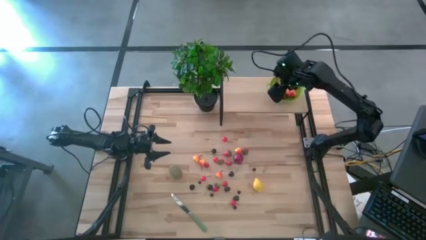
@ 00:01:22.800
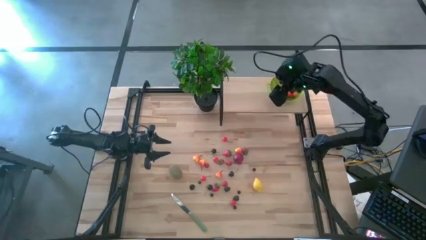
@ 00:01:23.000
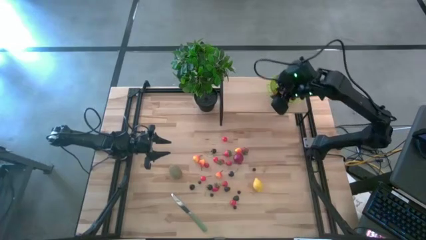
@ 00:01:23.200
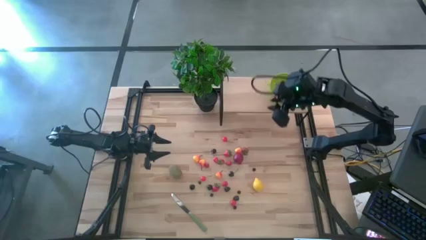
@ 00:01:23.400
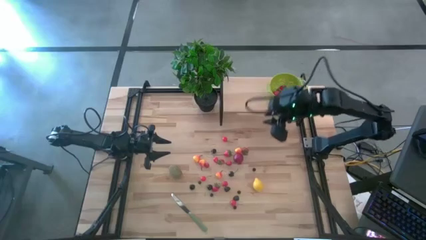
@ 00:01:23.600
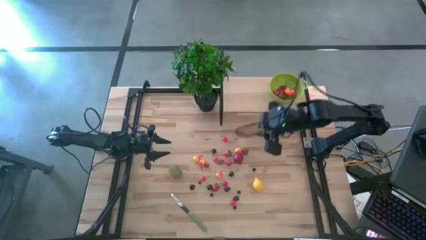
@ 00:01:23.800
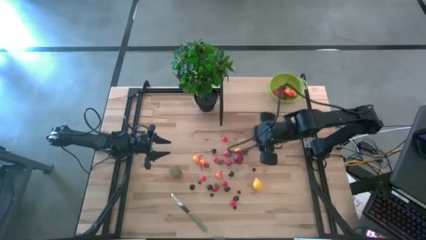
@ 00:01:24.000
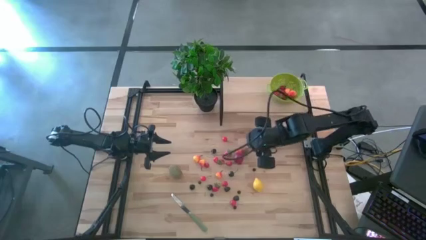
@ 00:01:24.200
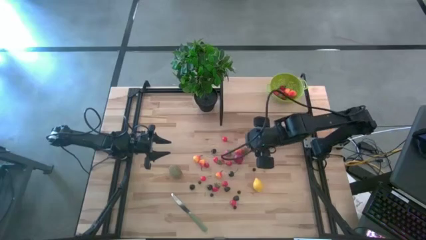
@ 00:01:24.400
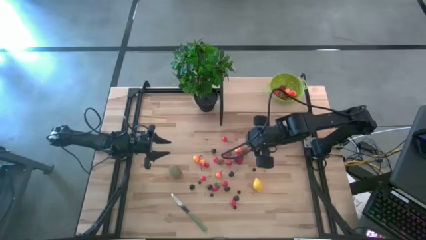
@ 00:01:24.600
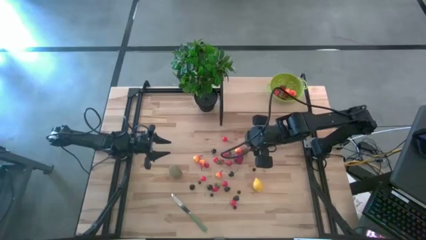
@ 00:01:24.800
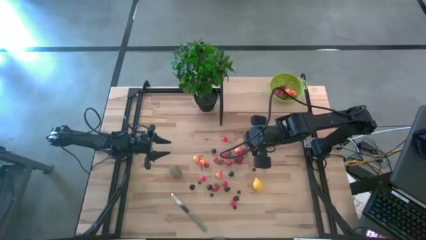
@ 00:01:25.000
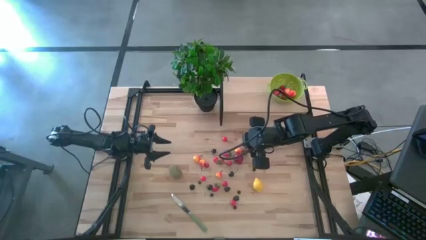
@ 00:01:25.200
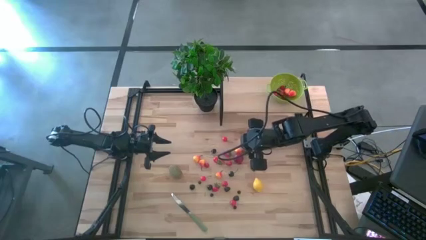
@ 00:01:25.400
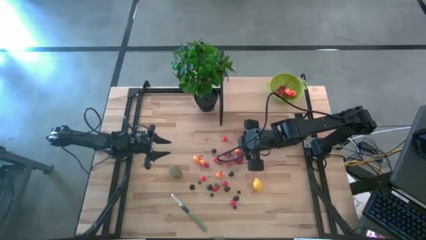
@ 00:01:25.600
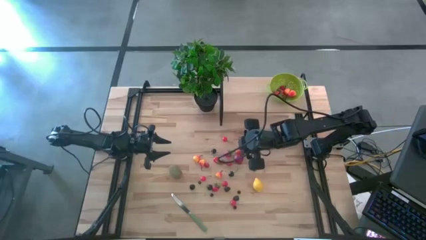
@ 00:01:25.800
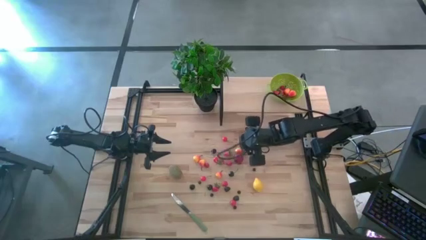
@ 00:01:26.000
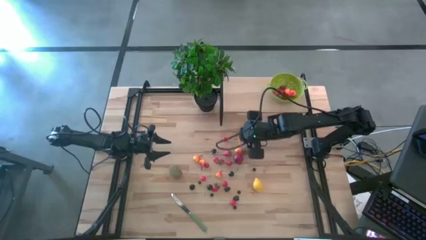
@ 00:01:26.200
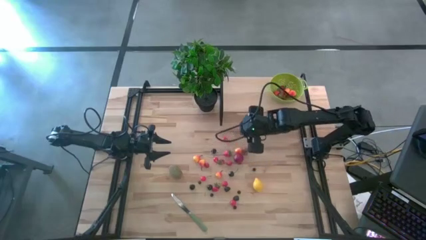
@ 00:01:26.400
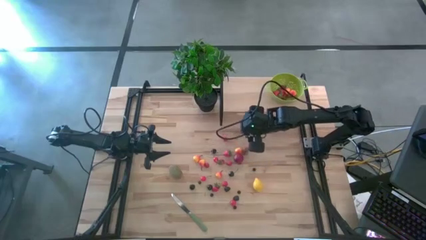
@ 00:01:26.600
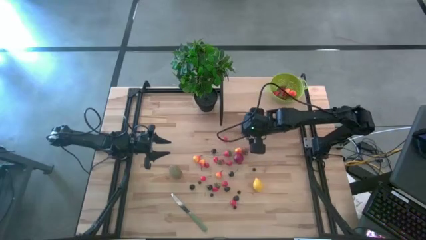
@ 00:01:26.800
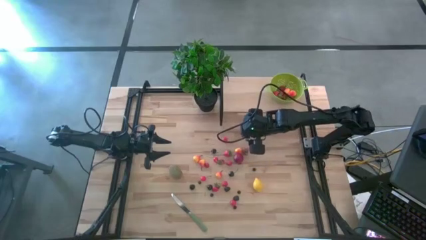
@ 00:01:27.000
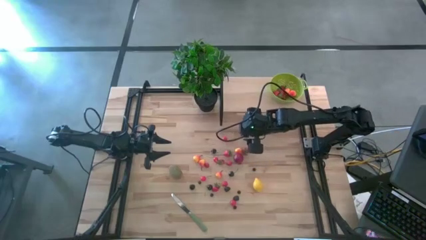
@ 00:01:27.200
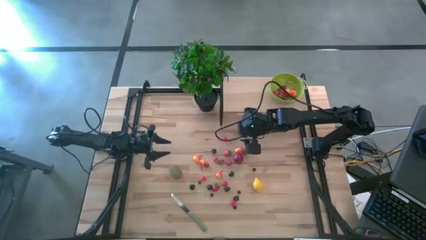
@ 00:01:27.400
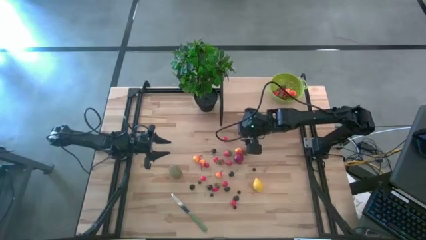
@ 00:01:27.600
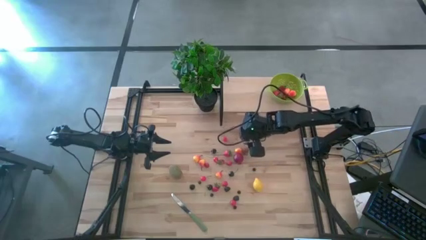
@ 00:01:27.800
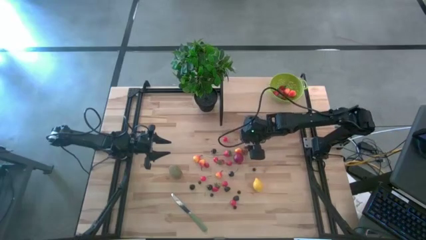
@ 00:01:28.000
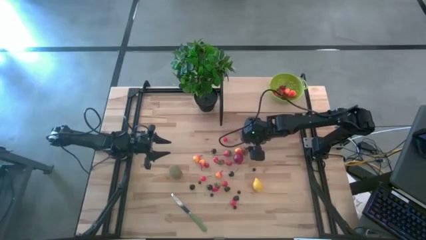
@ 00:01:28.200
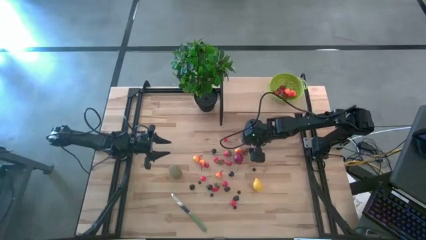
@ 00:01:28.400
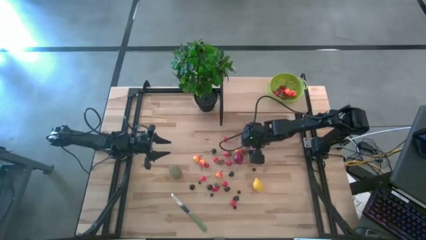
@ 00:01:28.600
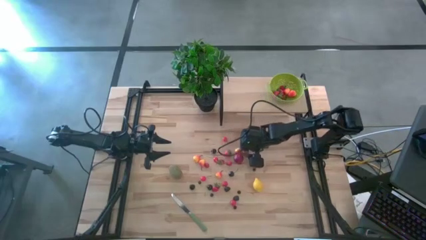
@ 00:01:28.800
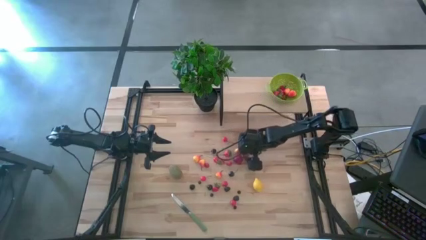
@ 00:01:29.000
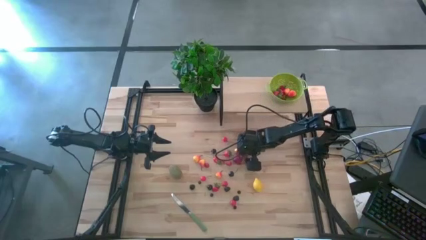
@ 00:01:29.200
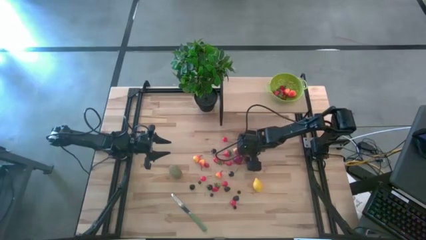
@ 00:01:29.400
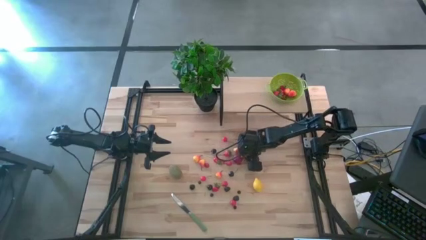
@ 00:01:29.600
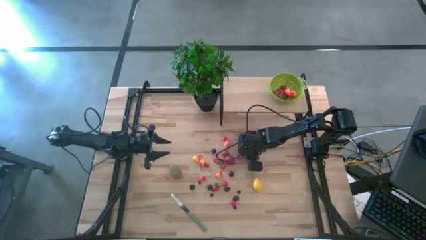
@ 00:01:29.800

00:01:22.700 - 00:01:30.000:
Task: Pick & Place Fruit
Put the strawberry into the green strainer bowl on the shelf

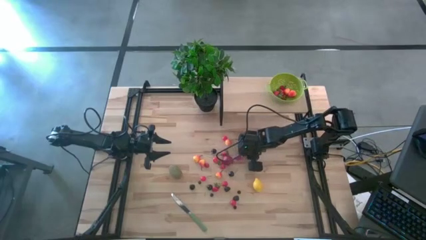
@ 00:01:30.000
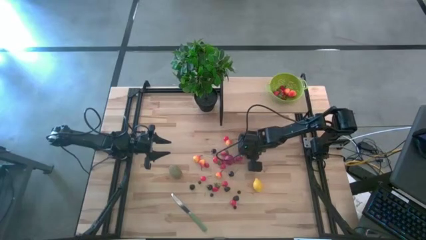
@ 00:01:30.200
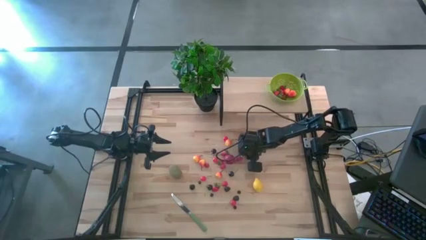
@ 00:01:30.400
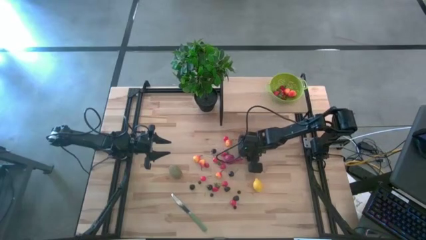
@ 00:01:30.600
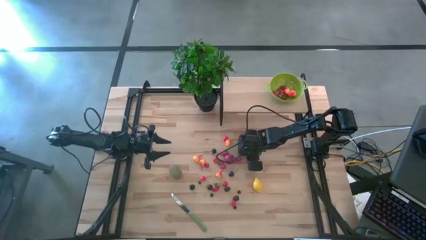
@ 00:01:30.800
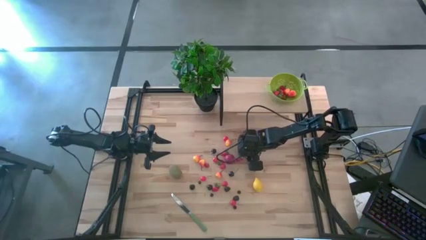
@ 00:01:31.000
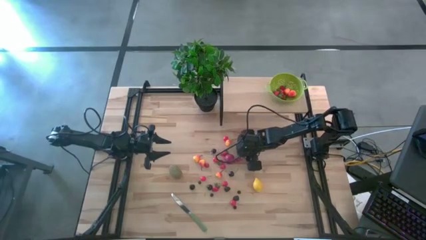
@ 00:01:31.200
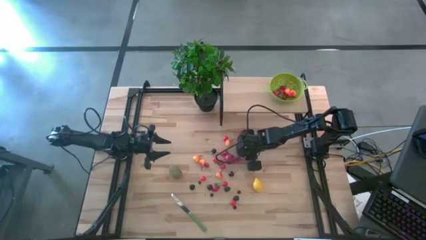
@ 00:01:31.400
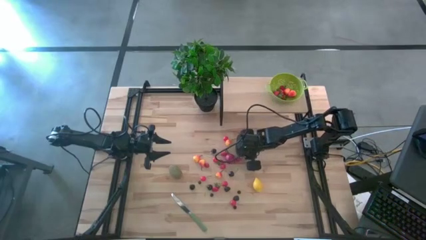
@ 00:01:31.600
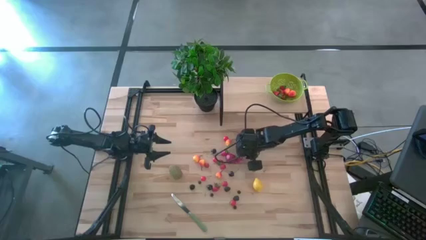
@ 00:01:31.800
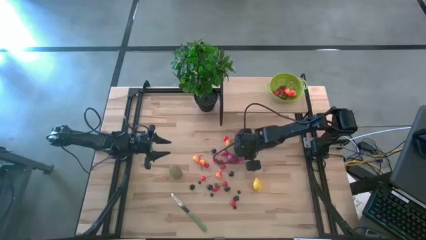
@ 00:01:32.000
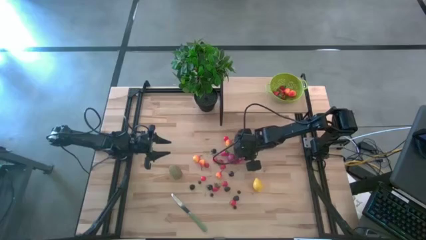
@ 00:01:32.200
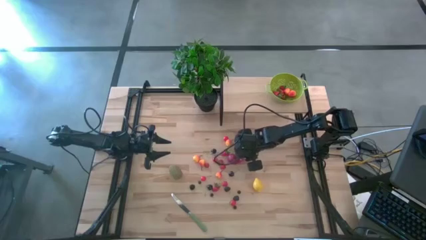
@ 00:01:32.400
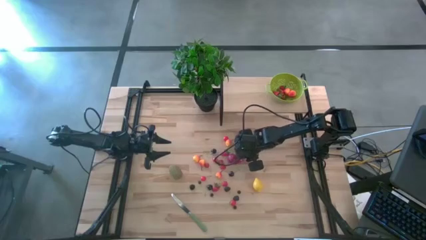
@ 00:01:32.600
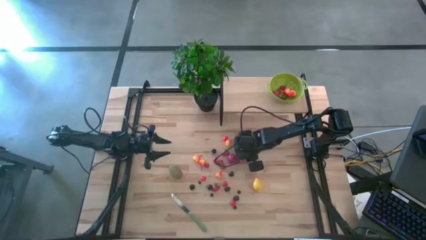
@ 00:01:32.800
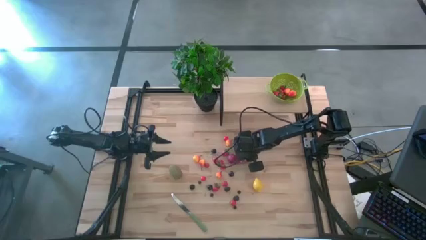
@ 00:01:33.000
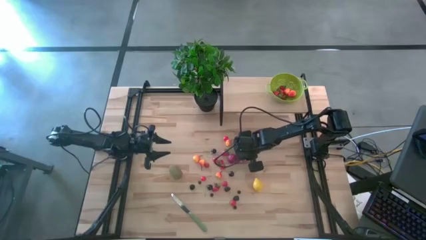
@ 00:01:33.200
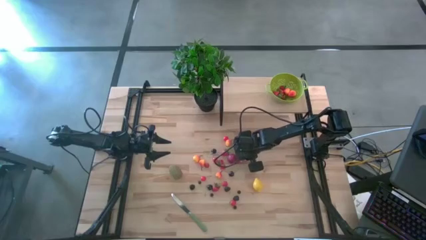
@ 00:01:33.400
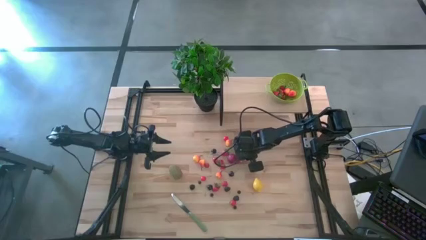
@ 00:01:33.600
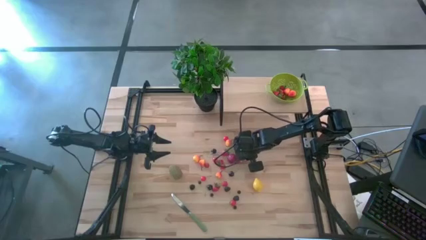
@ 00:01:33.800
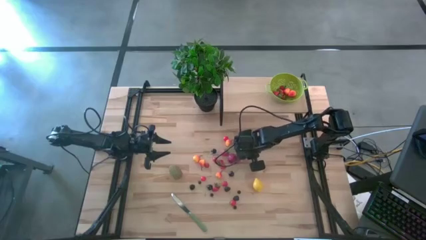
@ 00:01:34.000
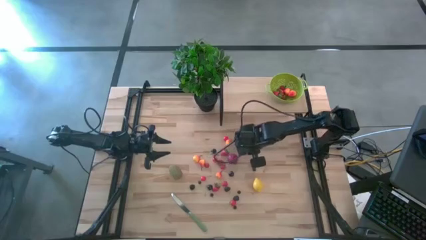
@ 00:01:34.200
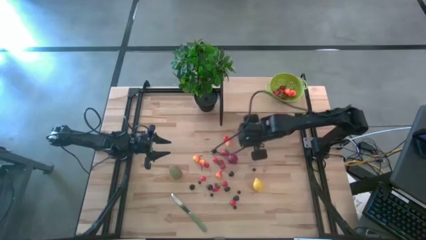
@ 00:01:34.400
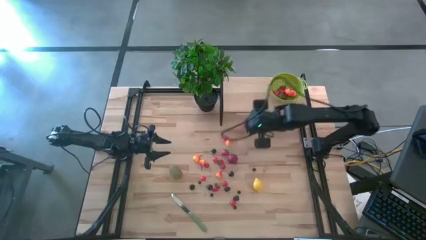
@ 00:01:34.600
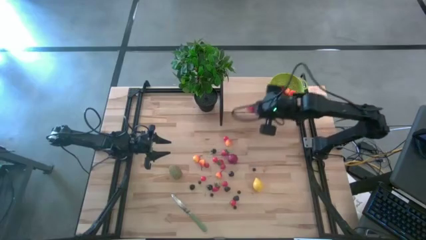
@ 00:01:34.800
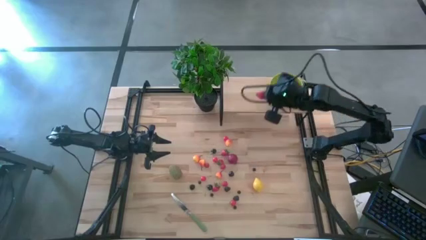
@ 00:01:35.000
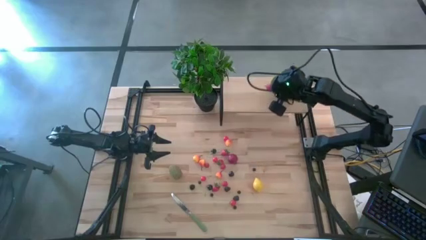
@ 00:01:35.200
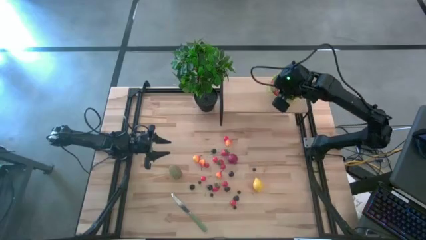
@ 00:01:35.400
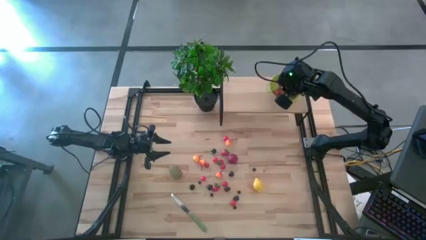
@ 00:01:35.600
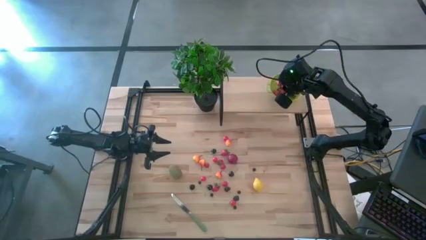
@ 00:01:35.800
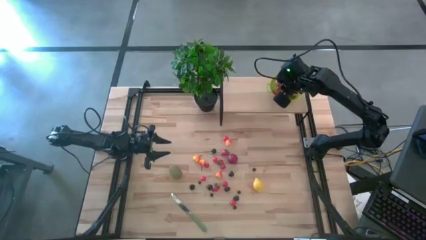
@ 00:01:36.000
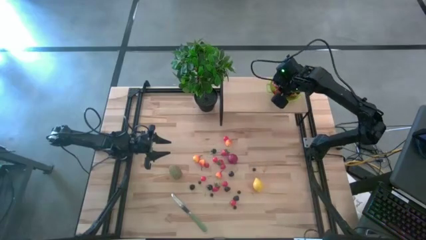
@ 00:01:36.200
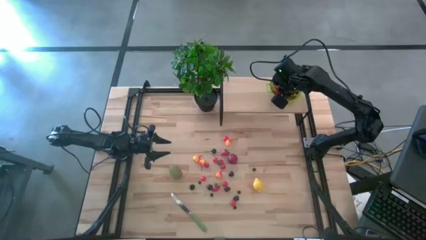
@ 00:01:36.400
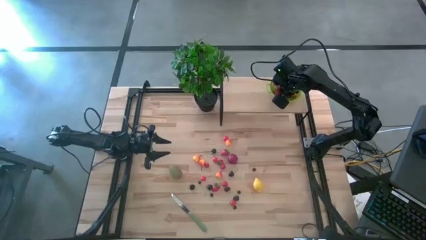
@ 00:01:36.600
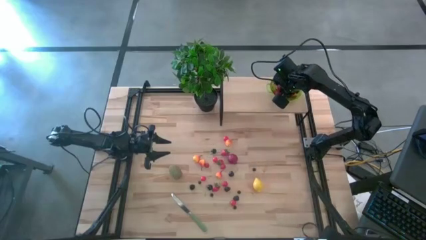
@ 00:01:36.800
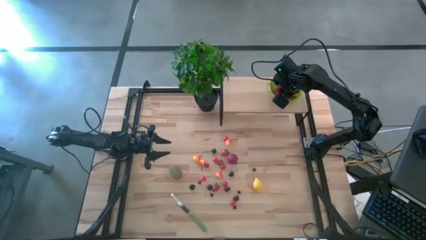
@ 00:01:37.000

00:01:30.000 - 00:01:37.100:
Put the strawberry into the green strainer bowl on the shelf
